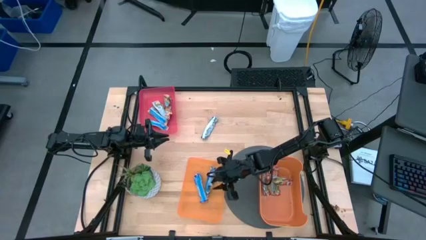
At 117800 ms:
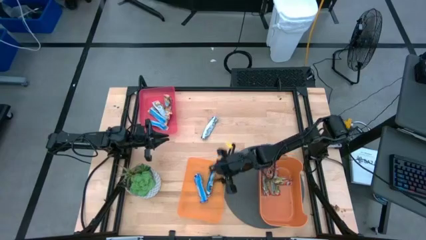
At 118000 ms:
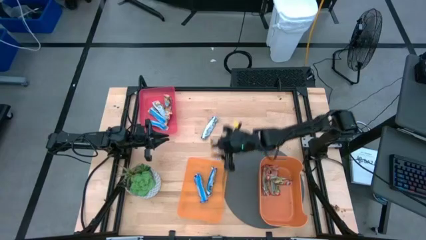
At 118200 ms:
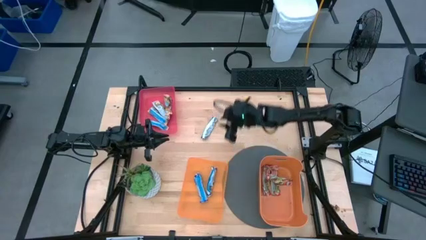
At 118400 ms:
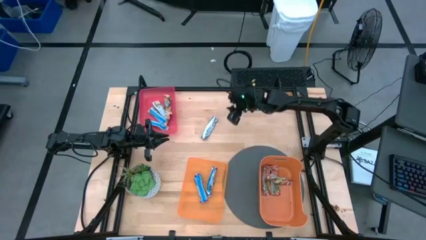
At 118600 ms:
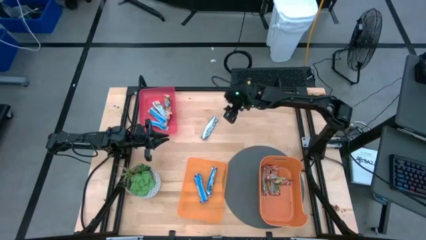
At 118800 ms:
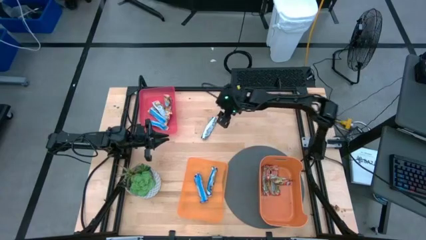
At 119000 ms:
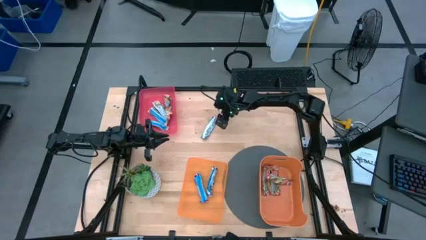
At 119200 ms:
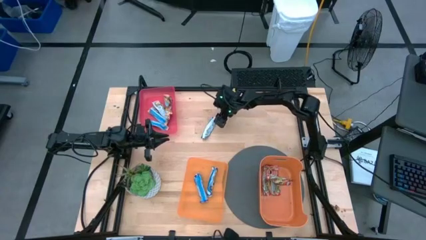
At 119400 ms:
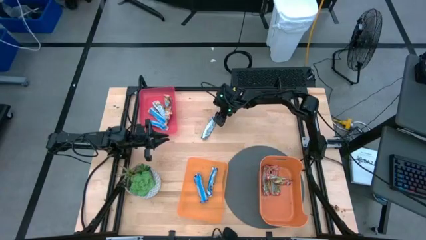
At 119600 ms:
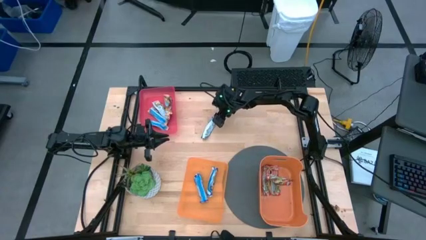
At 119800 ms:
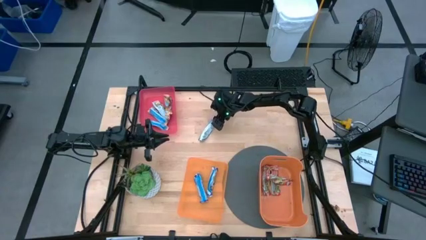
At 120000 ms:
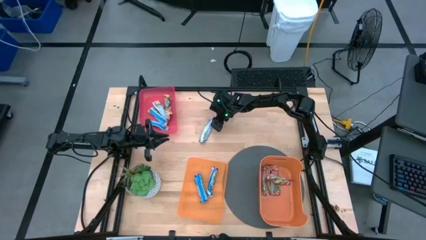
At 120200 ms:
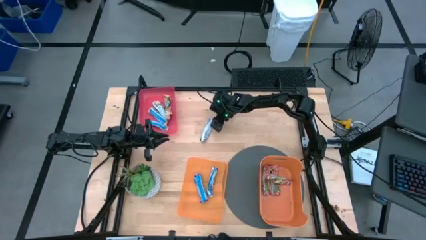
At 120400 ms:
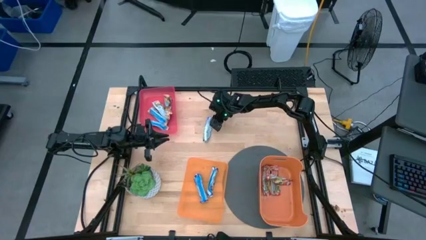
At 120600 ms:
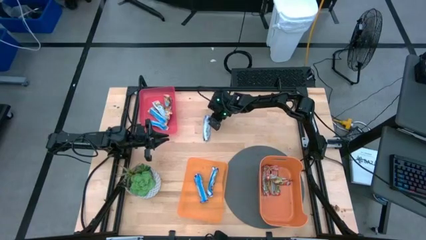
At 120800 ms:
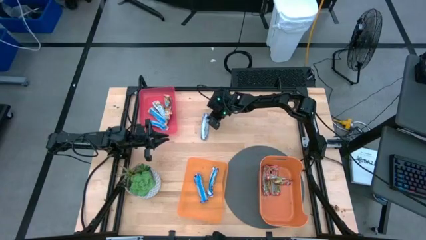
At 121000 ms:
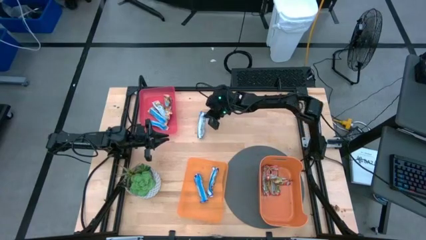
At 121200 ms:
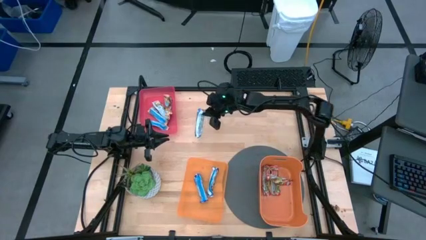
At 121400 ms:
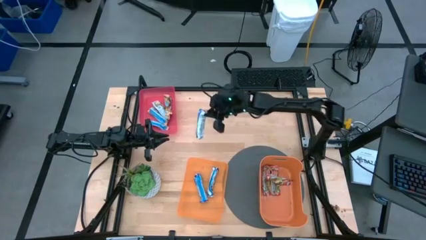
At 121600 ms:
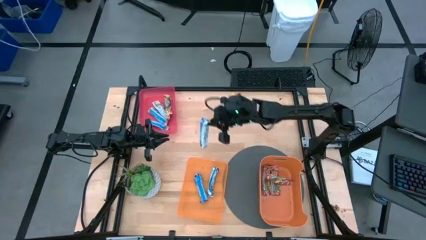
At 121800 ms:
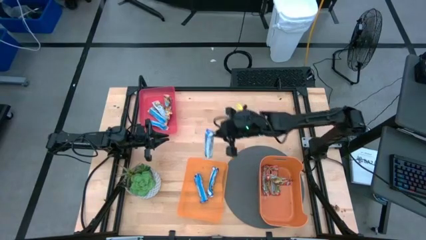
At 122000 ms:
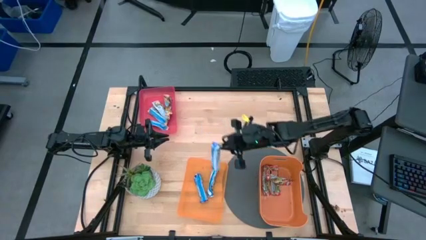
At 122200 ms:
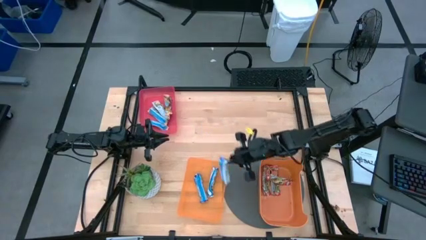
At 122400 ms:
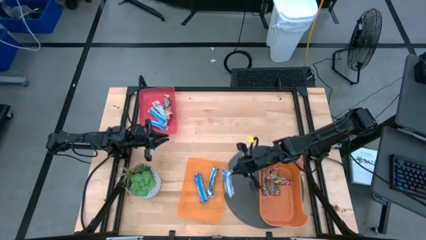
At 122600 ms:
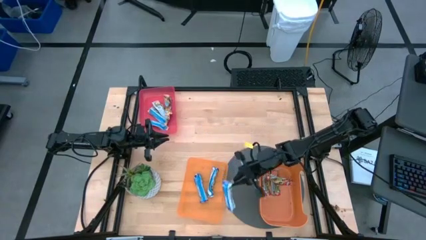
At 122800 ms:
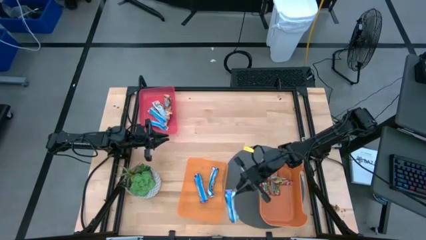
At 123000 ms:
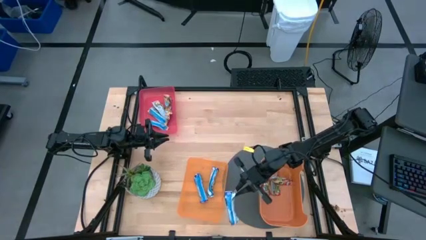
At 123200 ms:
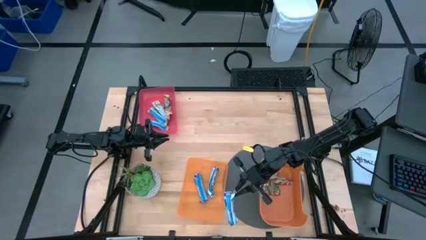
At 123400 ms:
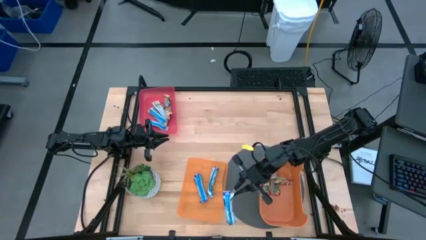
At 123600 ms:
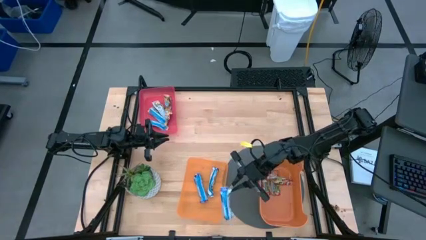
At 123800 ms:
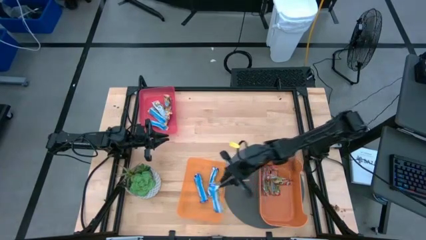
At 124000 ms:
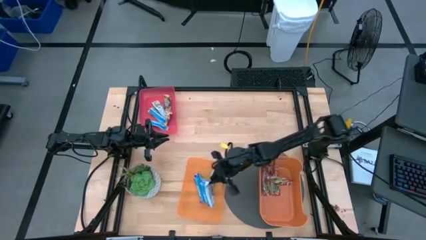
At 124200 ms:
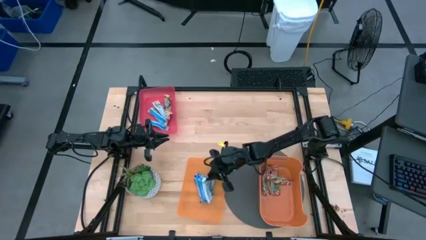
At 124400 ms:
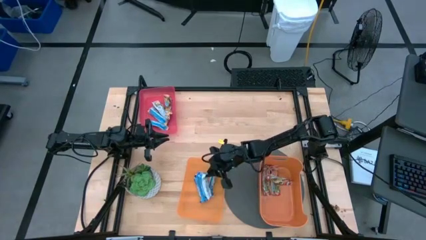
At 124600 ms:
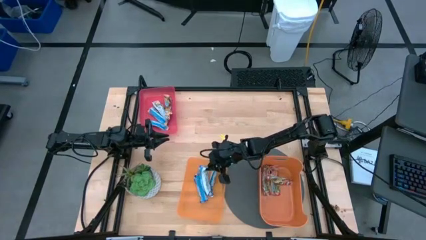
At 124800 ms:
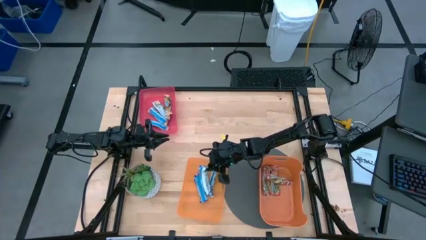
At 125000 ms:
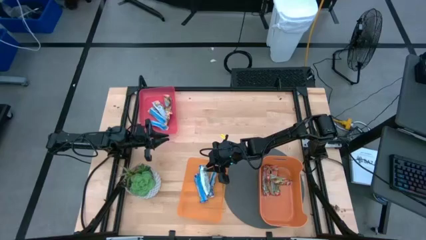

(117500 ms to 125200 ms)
Task: Pick and place Granola Bars by type
Put the blue granola bar into the left orange bin

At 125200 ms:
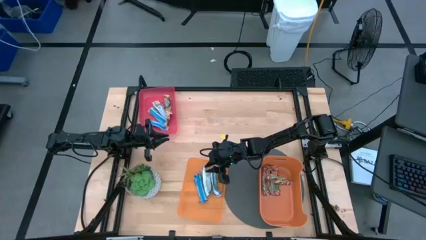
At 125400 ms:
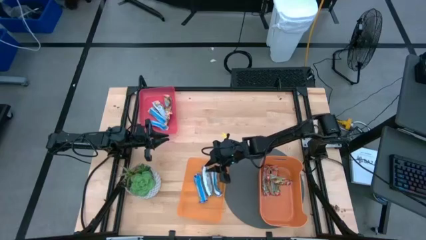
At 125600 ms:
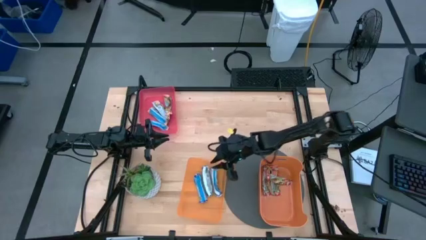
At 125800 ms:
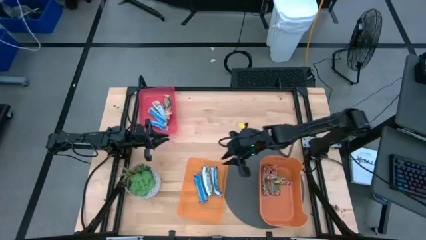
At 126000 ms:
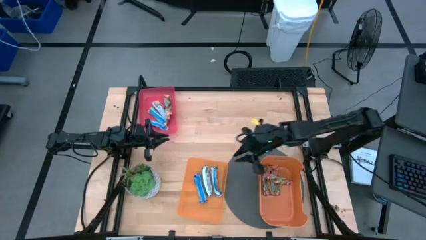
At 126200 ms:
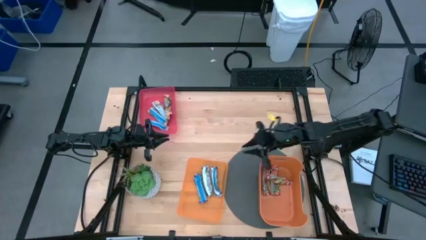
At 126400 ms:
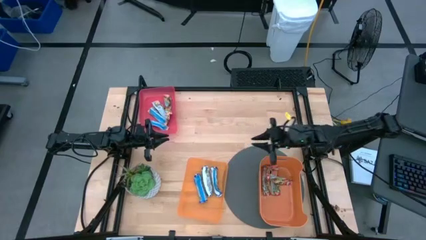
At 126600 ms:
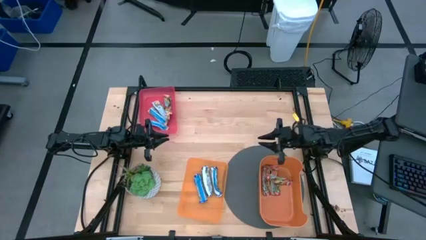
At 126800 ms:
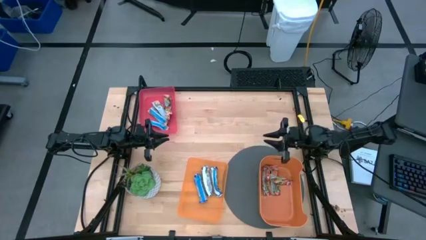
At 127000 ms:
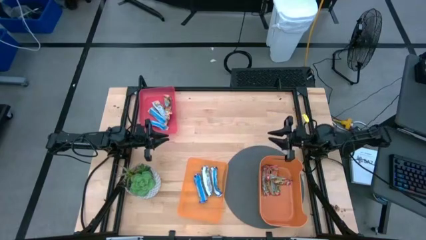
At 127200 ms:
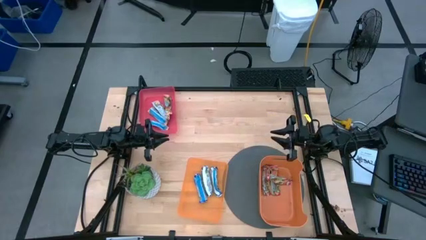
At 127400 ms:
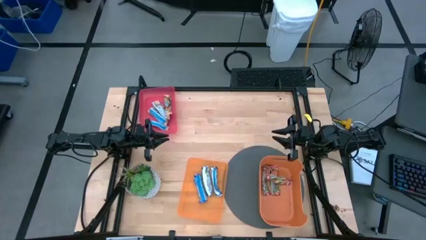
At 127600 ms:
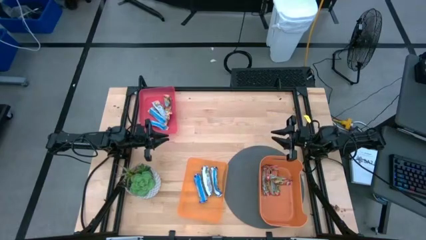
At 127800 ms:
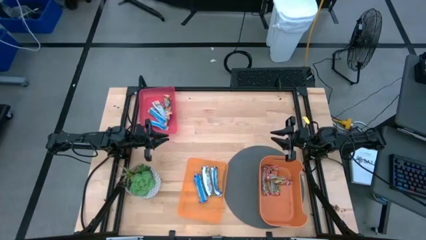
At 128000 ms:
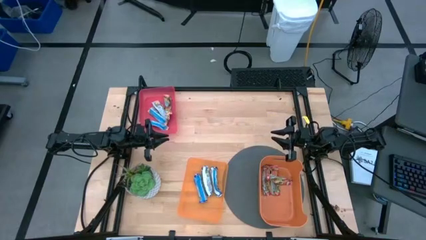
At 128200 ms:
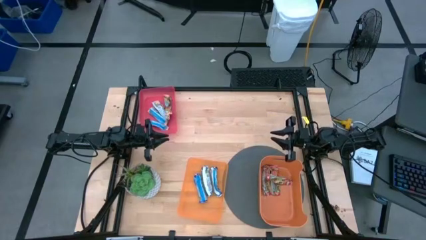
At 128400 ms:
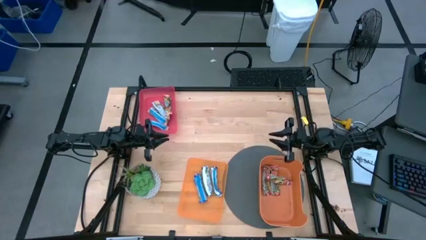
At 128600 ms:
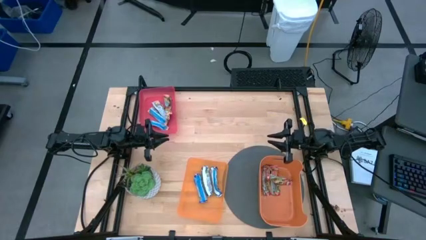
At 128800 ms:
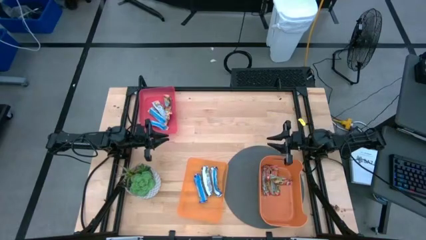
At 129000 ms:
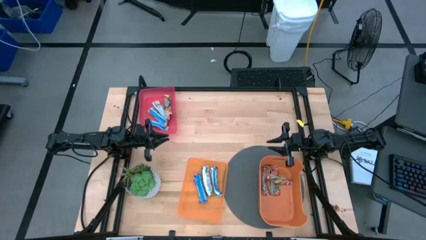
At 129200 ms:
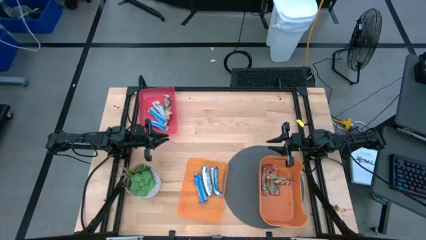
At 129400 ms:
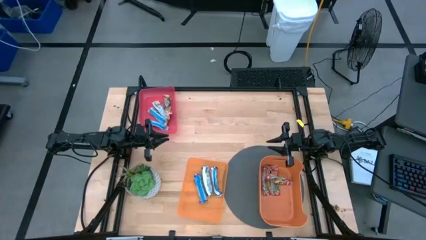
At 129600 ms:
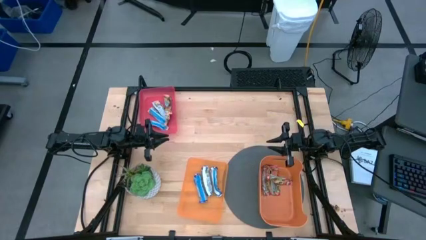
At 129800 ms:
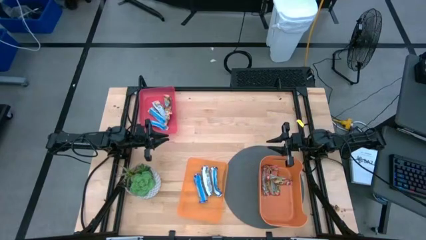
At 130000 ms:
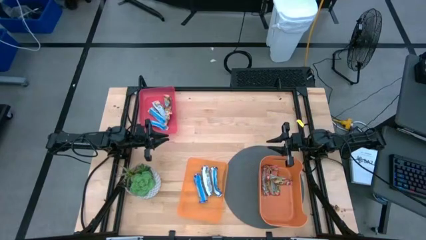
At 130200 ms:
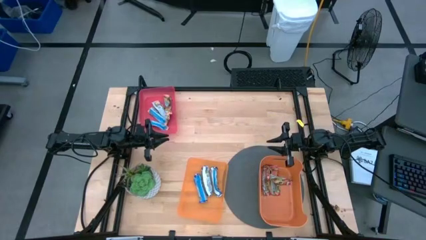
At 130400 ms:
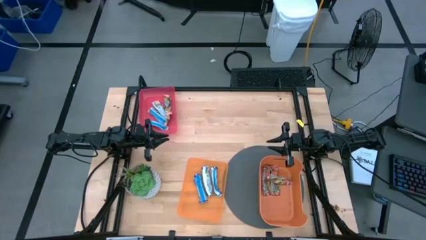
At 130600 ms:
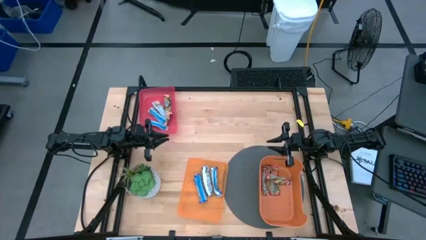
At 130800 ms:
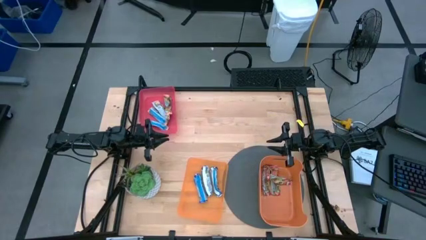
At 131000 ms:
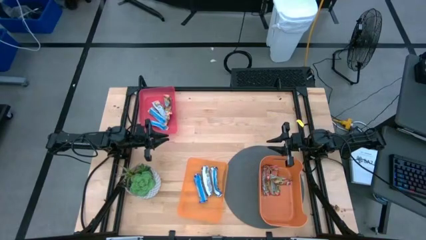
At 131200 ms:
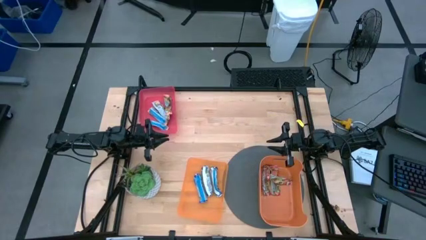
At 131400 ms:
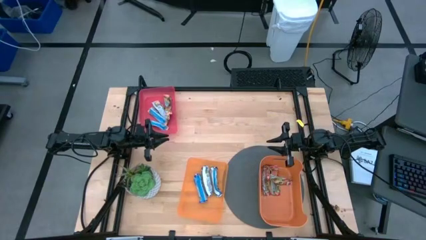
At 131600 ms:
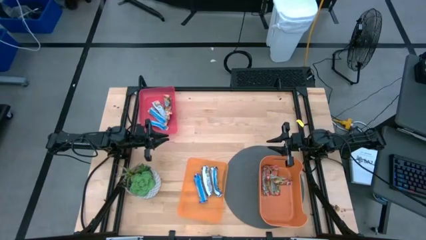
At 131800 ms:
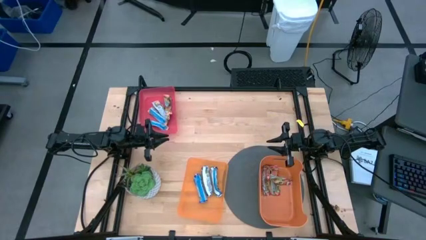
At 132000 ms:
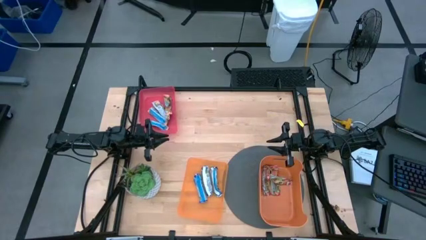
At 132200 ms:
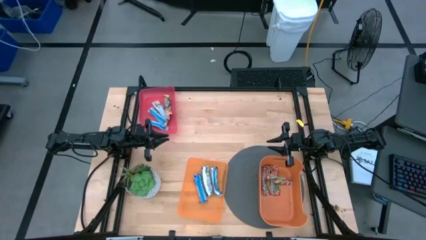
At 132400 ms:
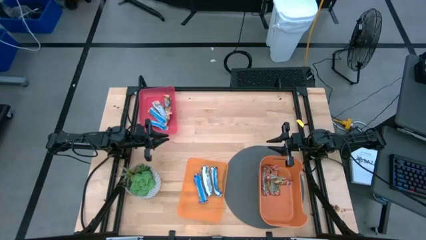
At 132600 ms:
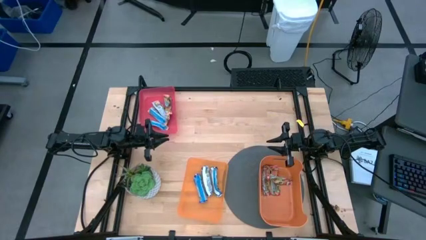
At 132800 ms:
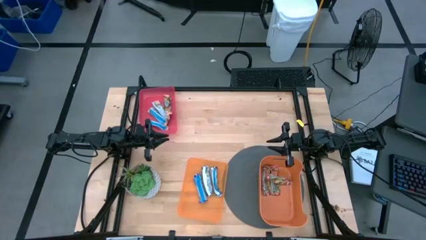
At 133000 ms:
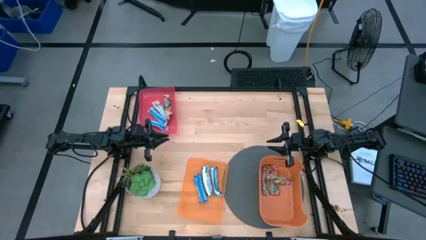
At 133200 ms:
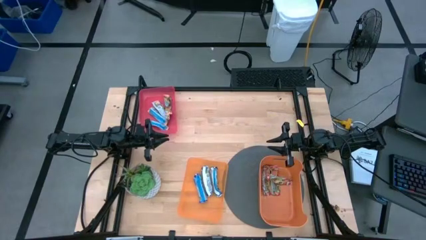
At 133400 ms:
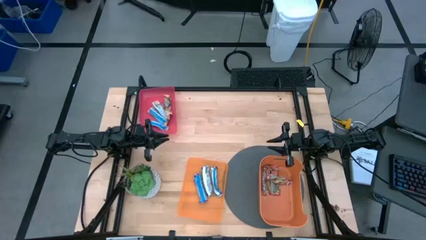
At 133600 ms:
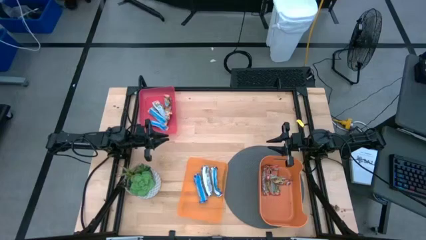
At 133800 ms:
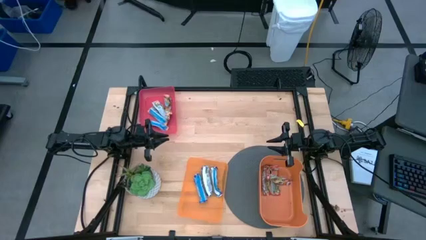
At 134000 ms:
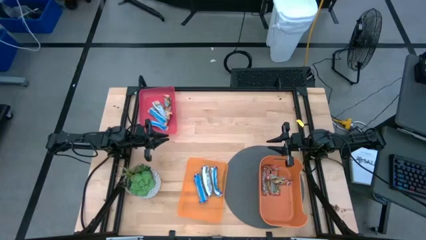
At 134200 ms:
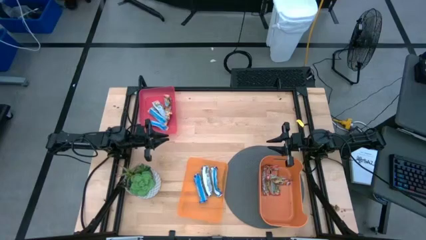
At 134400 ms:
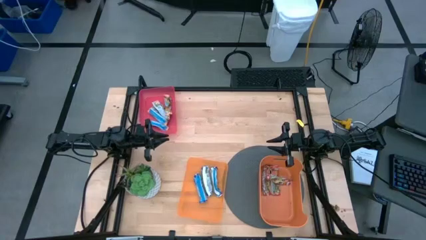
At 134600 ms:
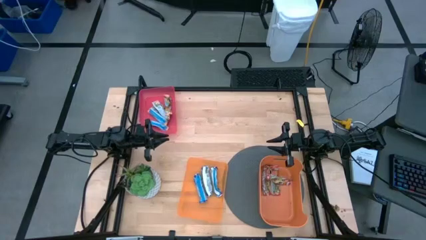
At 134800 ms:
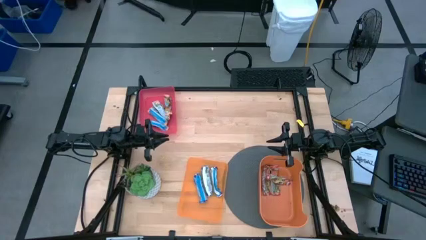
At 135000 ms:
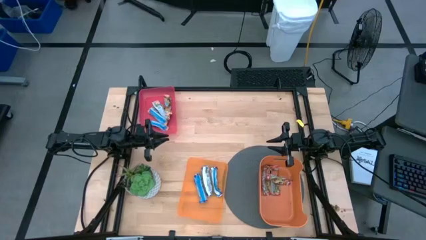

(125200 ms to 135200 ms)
Return to Home Position
